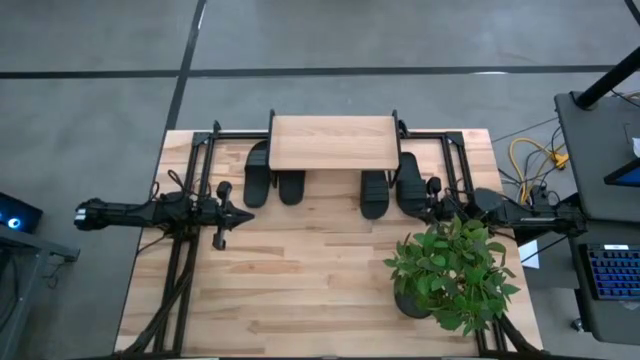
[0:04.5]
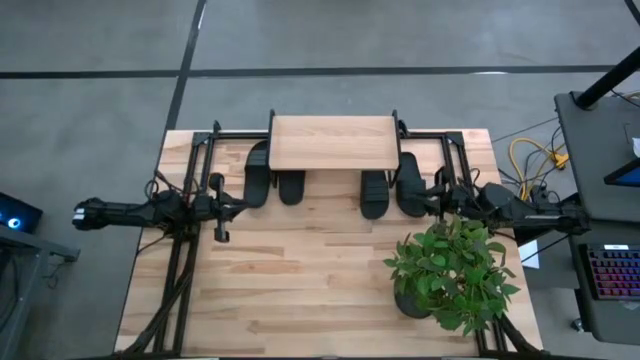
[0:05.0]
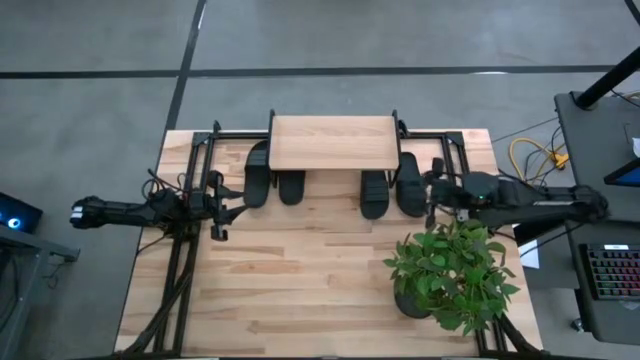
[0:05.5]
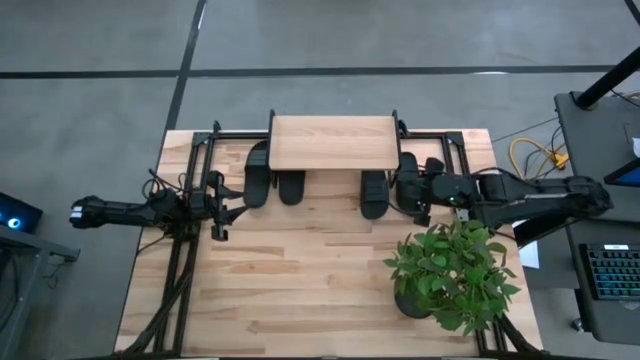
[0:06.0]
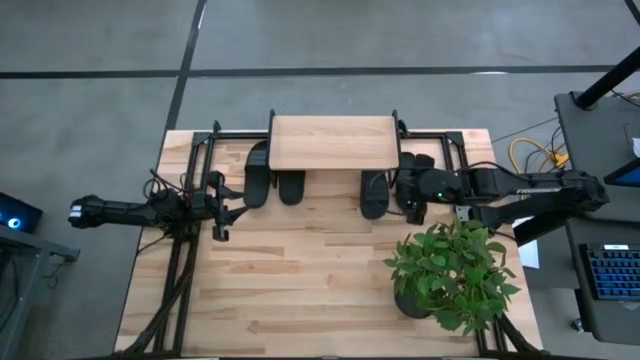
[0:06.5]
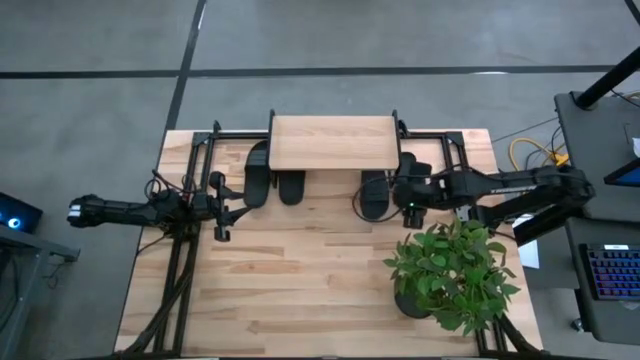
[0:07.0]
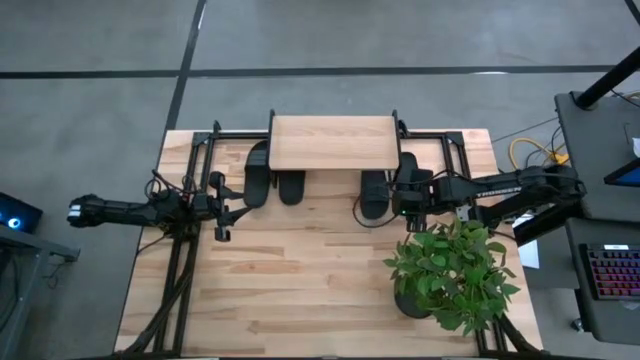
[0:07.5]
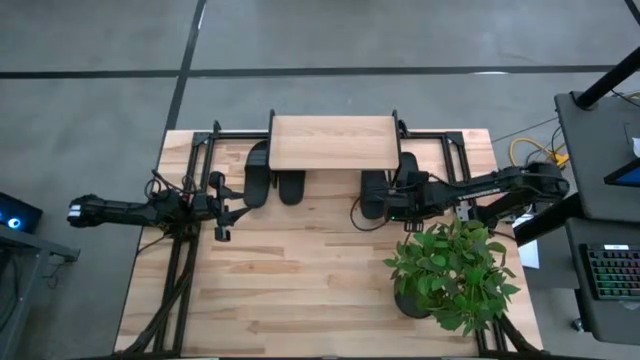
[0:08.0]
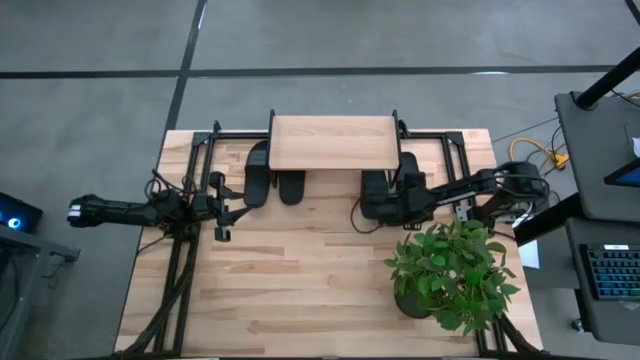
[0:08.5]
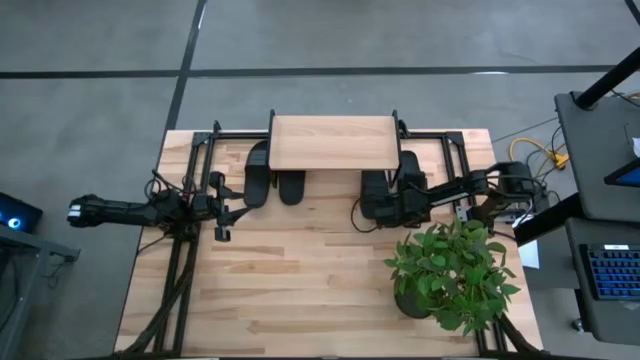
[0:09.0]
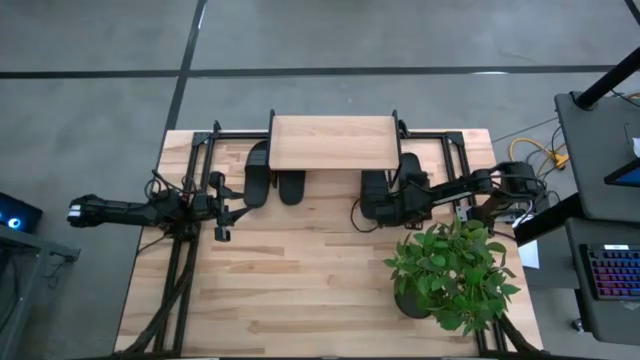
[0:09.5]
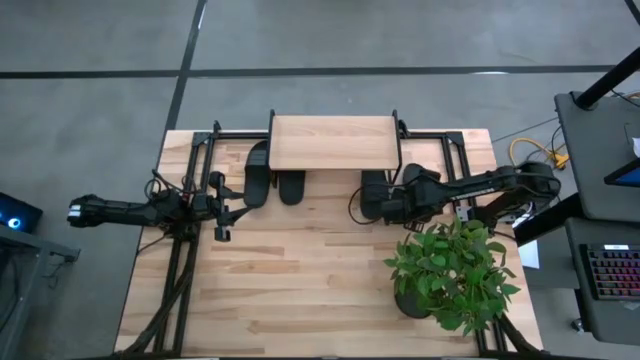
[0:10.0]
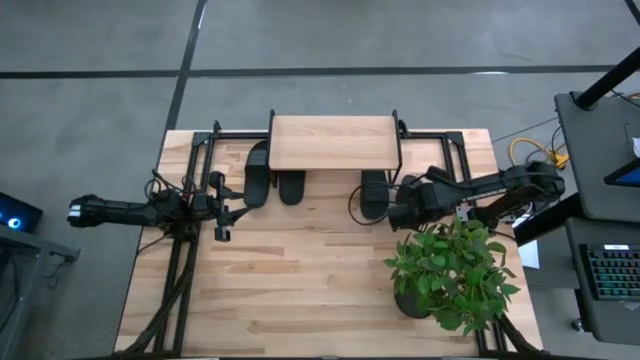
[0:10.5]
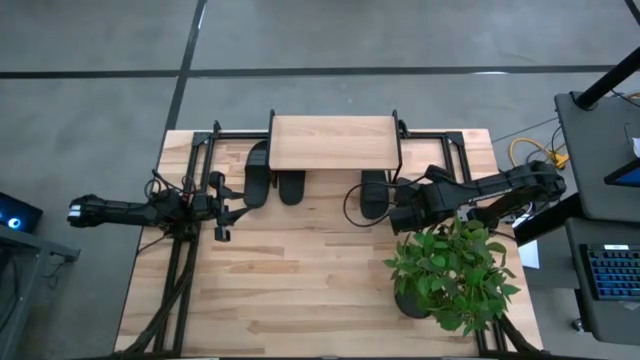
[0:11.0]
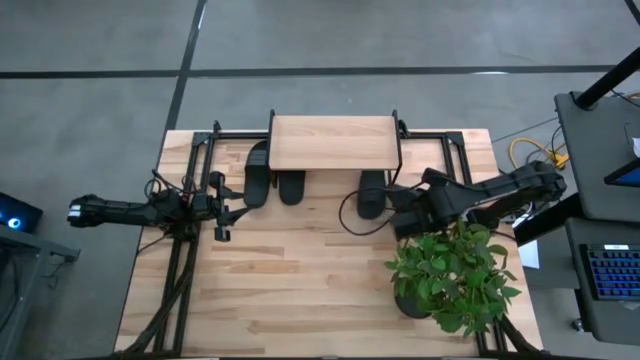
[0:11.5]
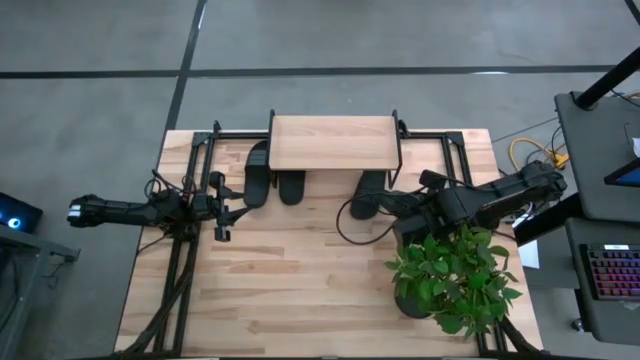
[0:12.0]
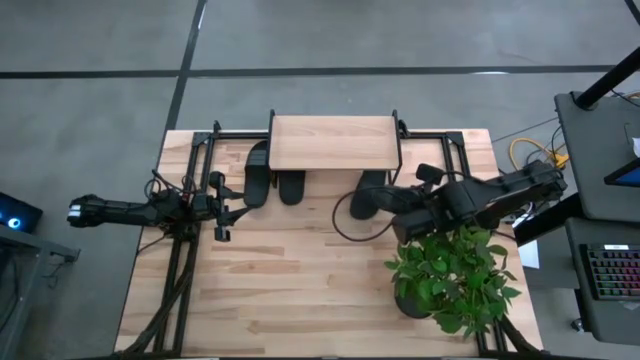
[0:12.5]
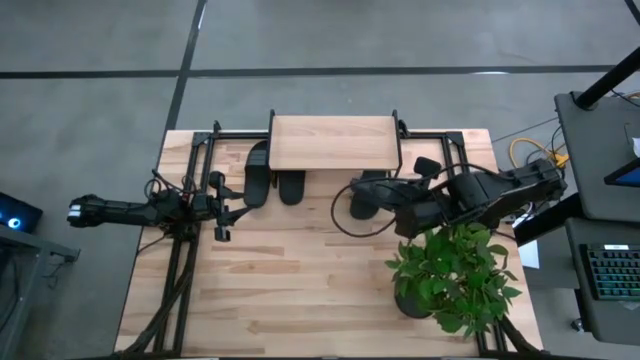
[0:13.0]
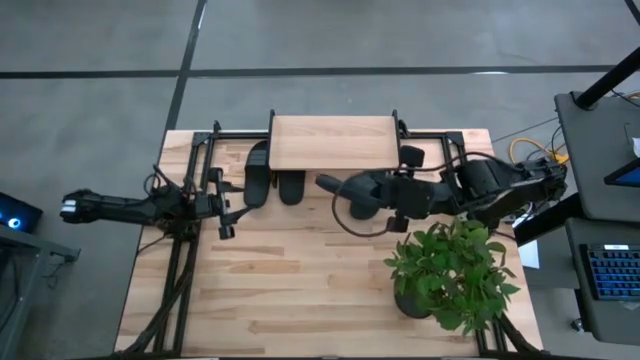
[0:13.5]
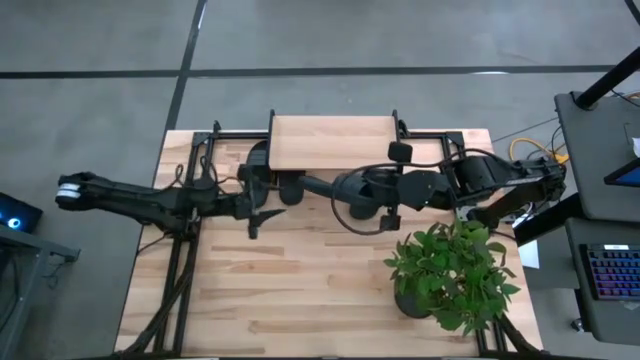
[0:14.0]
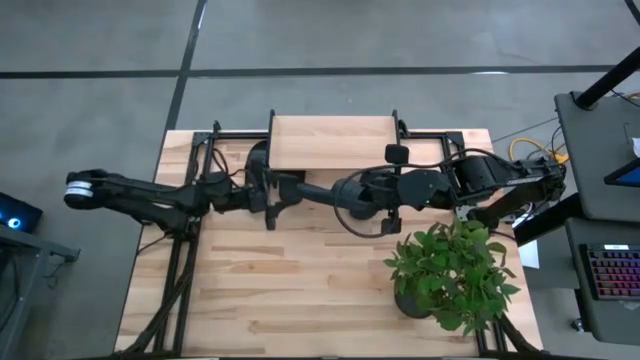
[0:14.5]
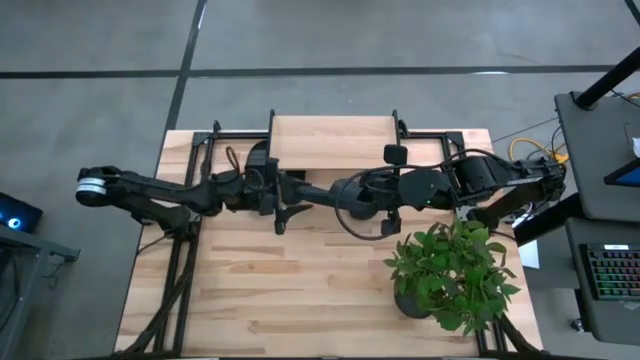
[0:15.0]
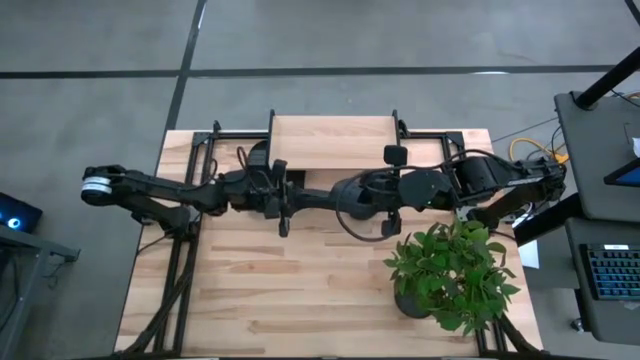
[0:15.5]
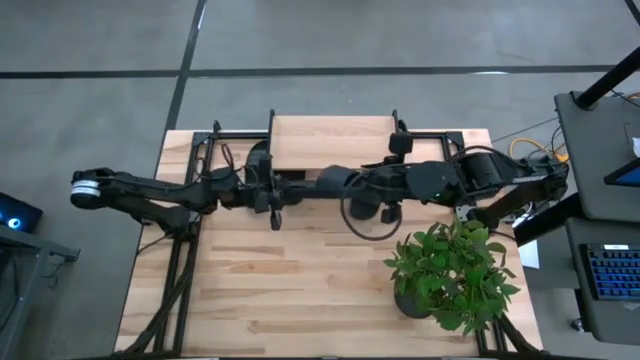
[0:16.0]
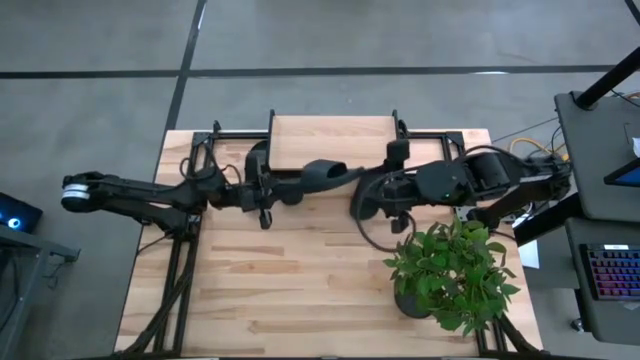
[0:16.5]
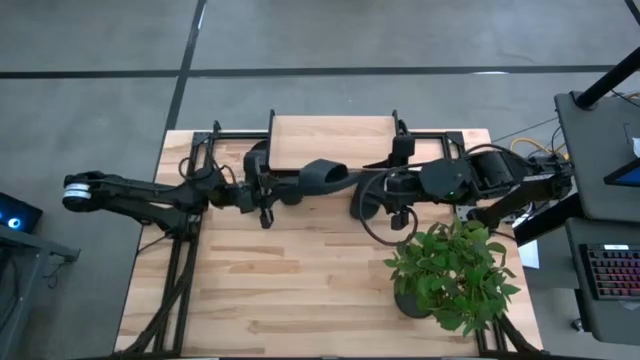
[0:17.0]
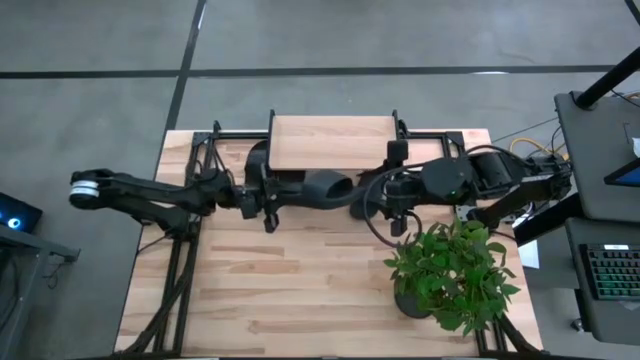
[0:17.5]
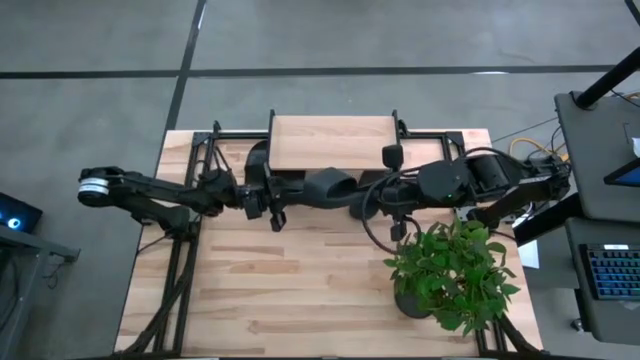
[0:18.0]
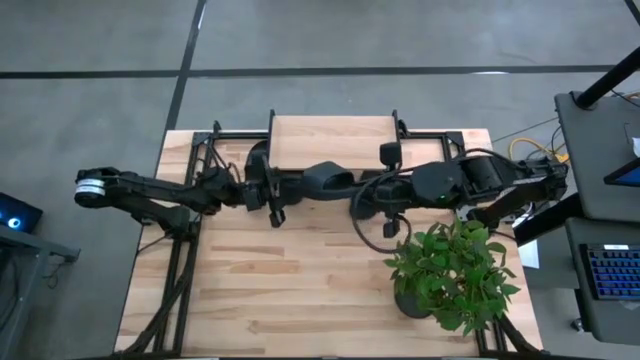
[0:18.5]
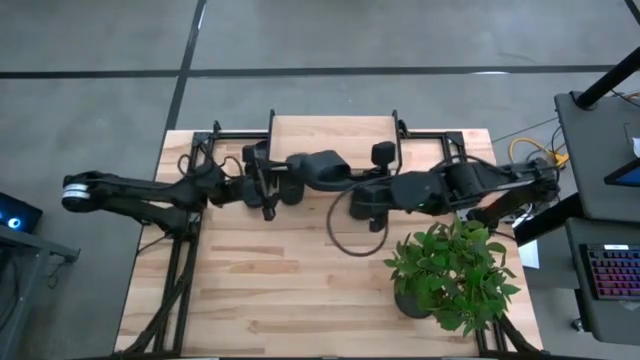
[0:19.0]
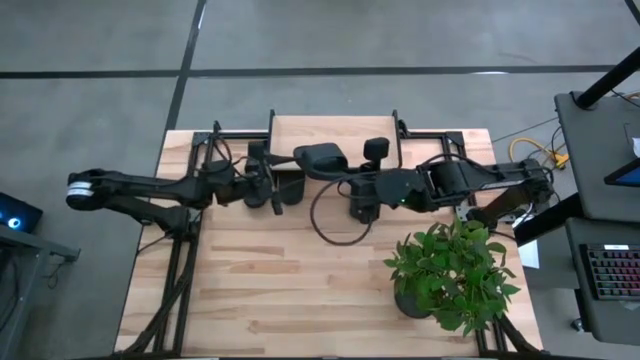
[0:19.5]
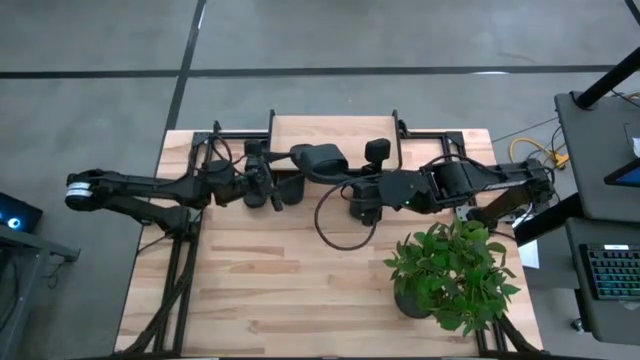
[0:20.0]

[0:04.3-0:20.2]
Task: Pick and place slides into the shelf
Put the black slipper on the shelf

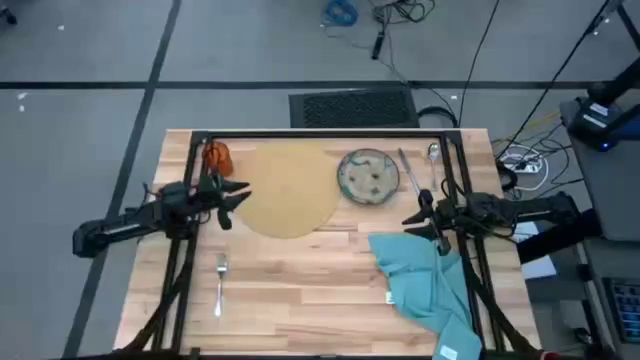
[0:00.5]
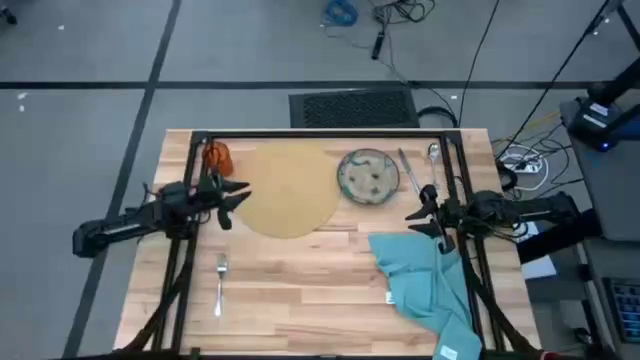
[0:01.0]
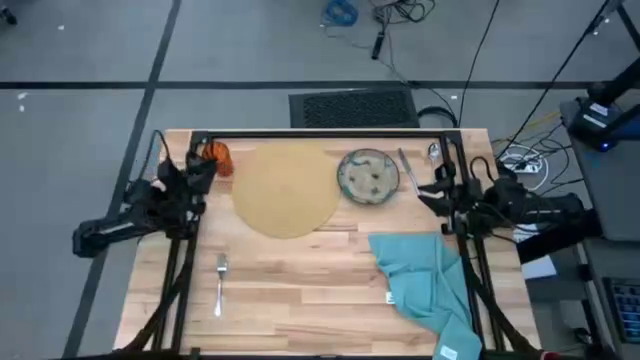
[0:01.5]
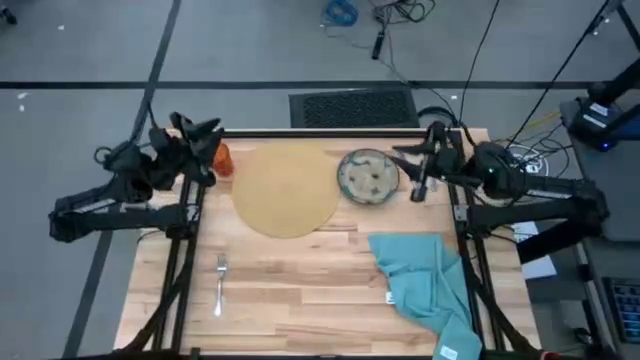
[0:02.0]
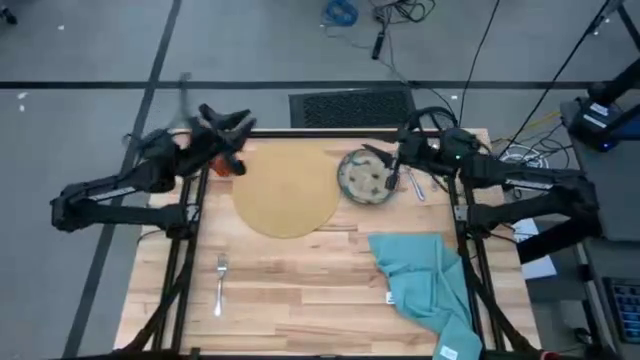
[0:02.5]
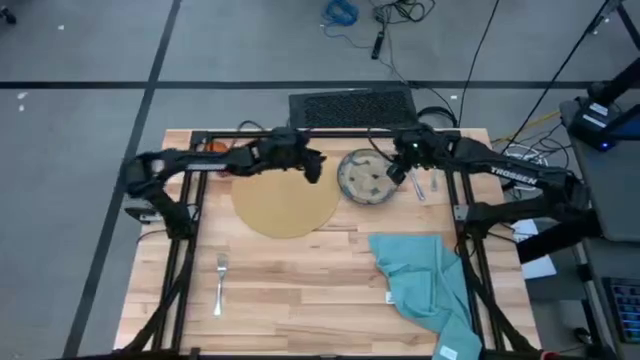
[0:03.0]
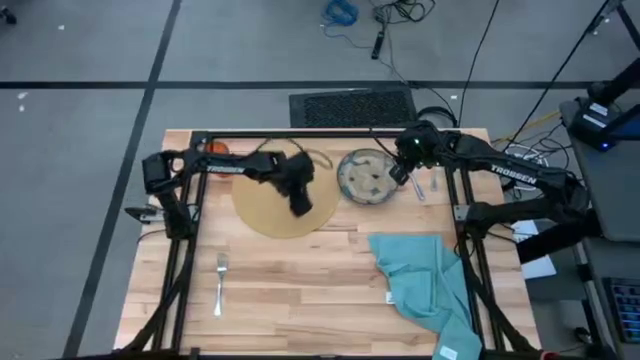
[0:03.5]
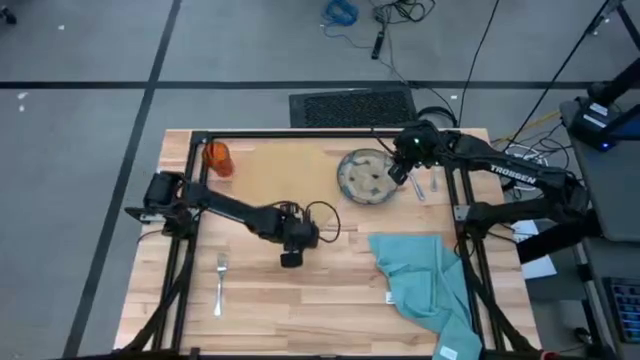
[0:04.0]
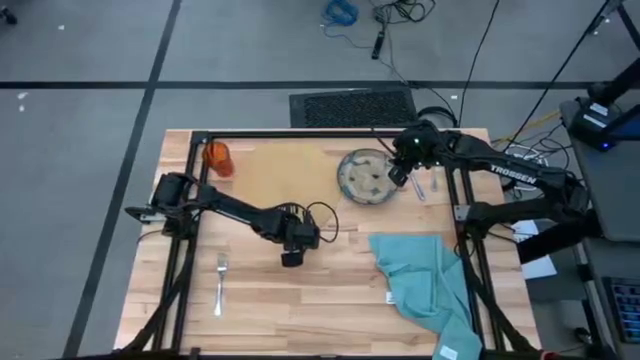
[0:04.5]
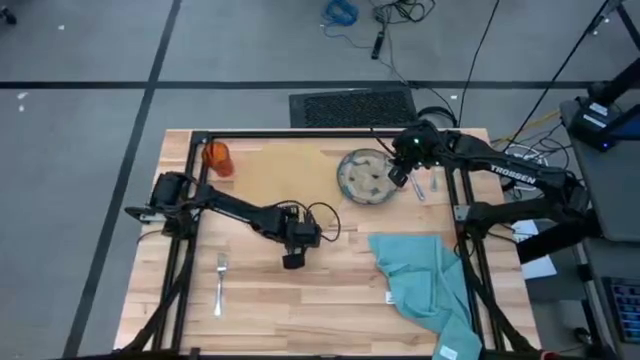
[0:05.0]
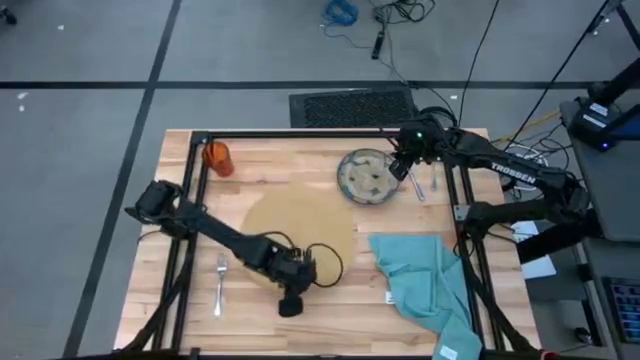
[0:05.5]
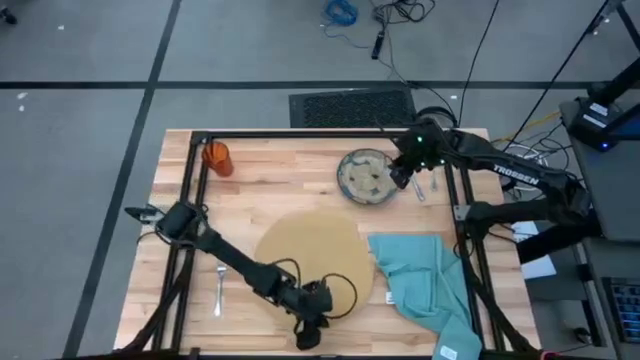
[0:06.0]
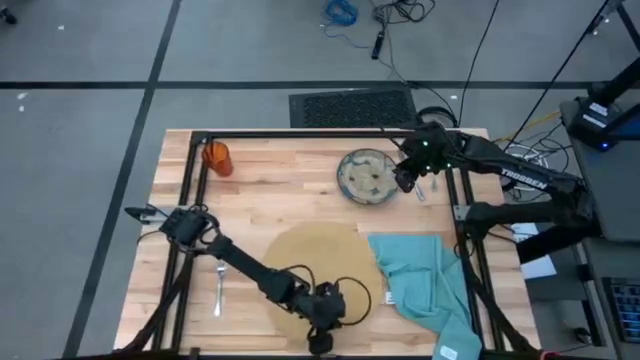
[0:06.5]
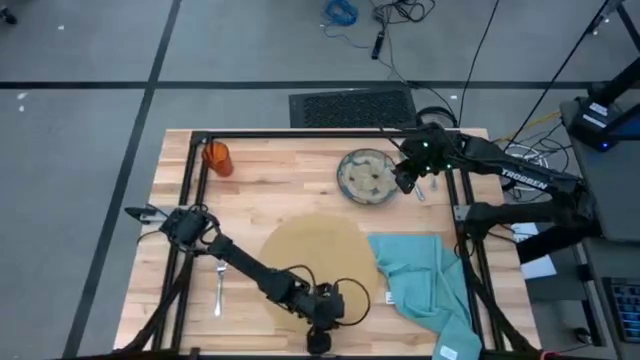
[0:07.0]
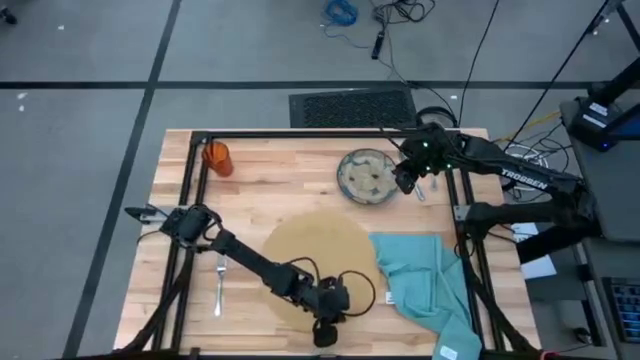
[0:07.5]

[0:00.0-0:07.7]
Task: Set table place
Move the brown mat to the bottom center
